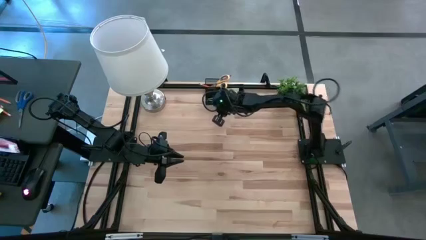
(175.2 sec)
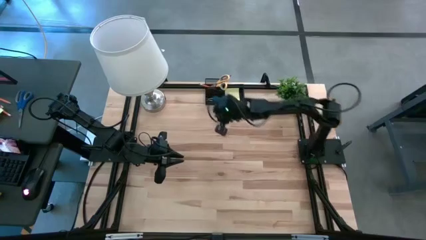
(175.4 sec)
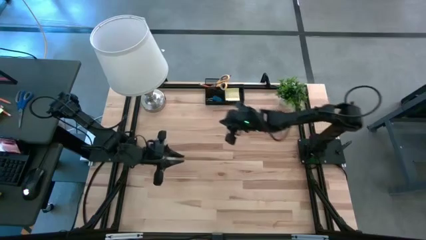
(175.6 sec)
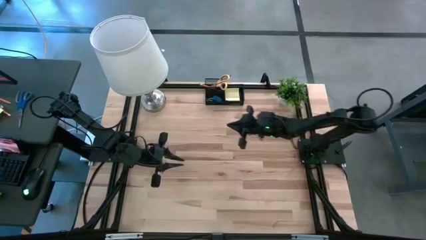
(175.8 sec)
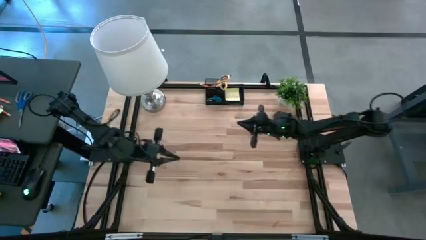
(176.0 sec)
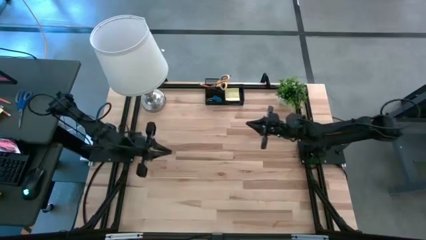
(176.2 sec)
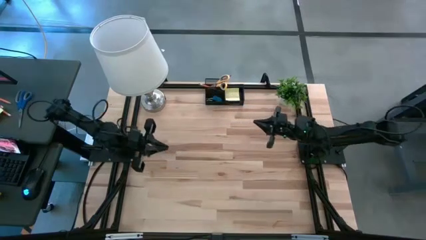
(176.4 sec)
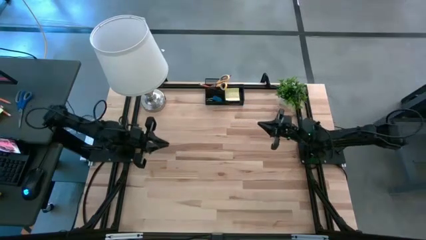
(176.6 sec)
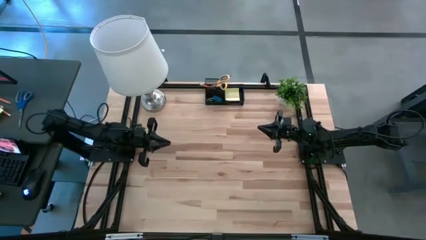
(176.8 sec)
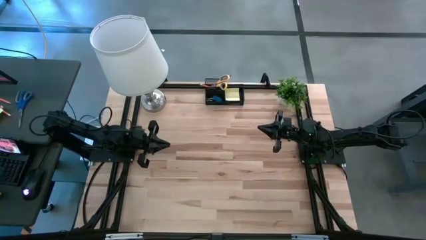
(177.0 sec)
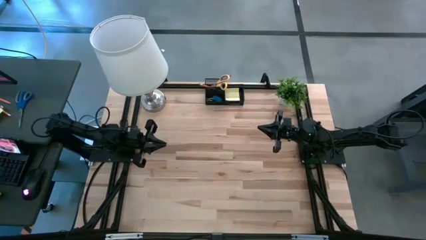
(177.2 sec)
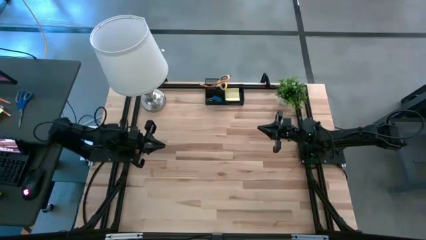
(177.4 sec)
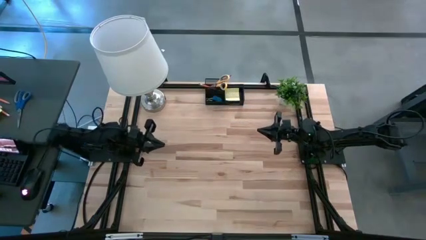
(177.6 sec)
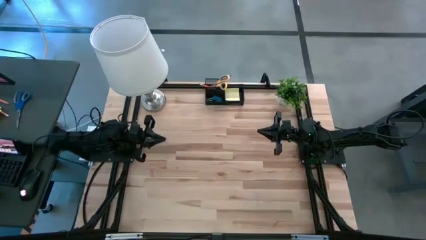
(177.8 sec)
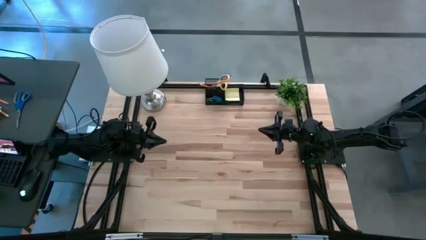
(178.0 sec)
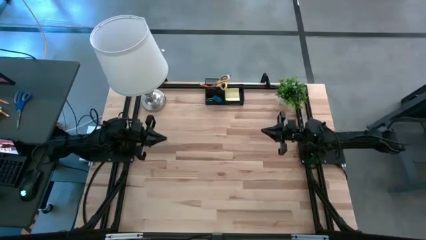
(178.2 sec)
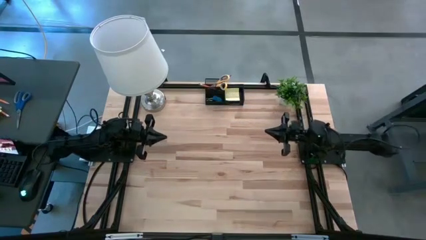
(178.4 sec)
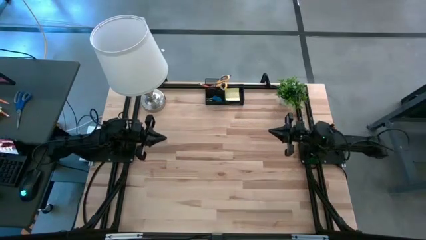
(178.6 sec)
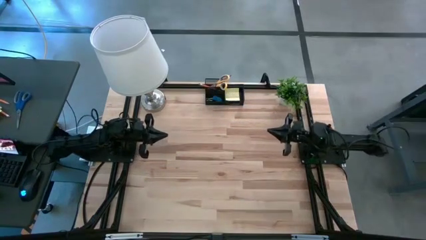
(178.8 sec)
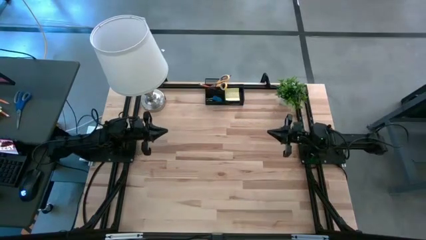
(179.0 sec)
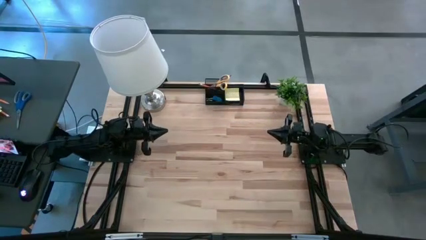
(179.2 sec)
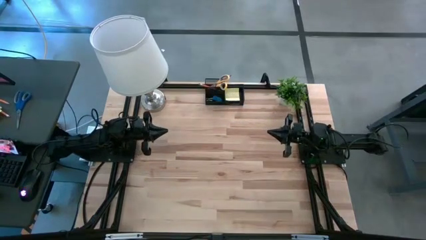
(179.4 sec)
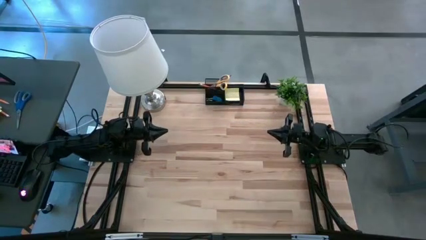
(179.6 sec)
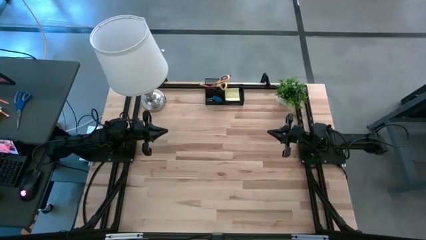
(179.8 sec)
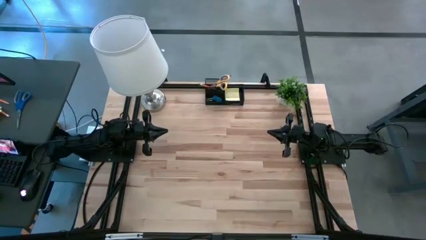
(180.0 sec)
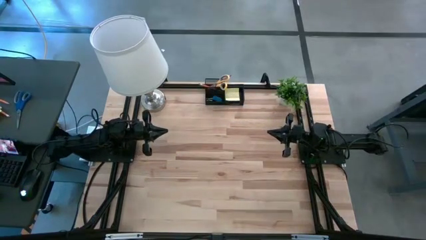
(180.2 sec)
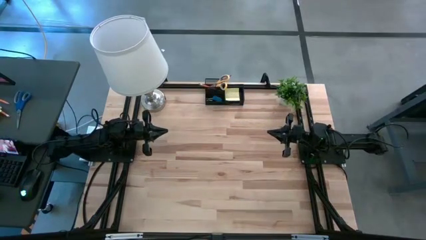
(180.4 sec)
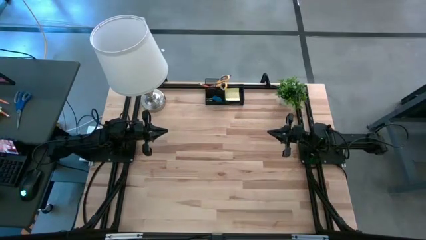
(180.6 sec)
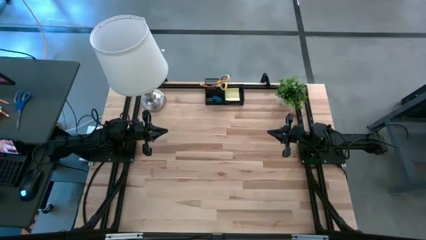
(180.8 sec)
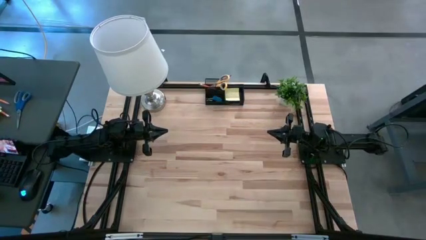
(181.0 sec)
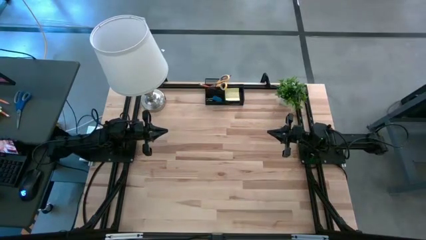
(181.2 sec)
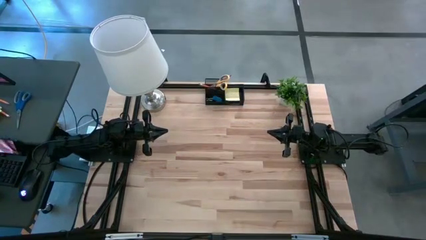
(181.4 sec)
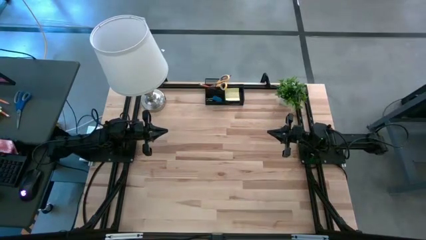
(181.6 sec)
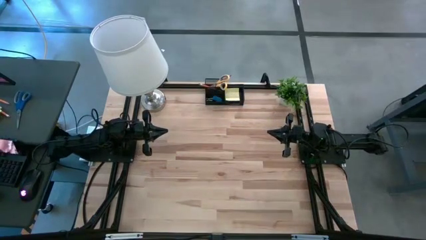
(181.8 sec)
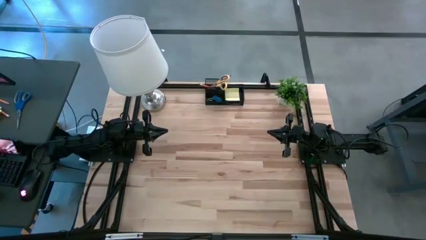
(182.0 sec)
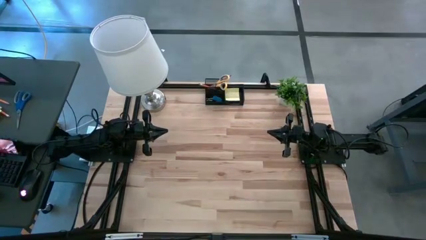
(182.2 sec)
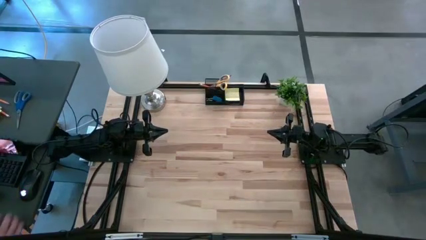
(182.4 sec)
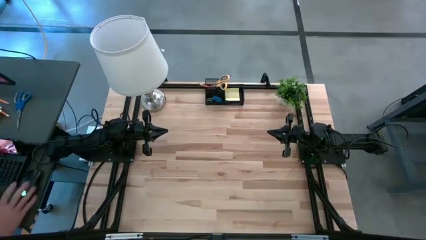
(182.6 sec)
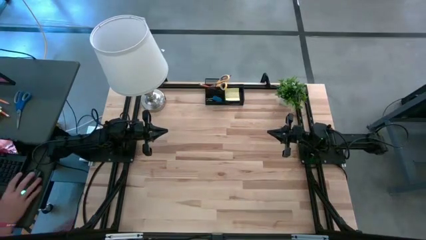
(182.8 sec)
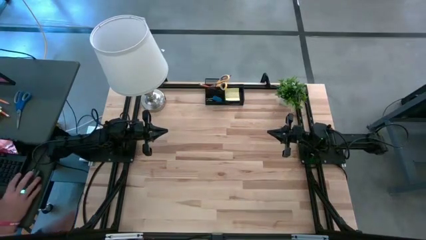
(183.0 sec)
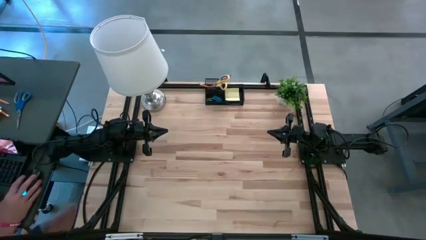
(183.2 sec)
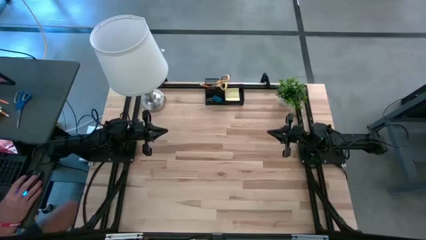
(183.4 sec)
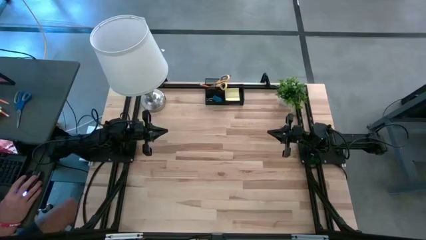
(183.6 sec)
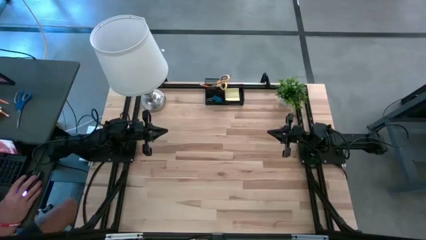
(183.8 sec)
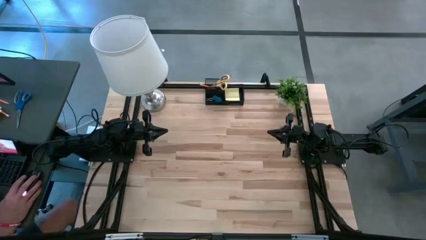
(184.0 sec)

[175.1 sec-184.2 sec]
Task: Pick and place office supplies into organizer
Return to Home Position

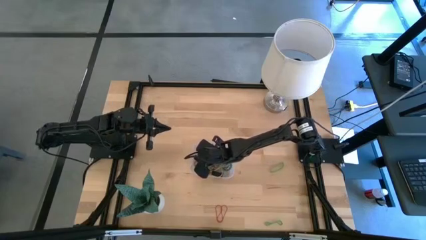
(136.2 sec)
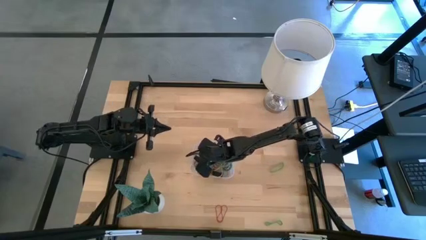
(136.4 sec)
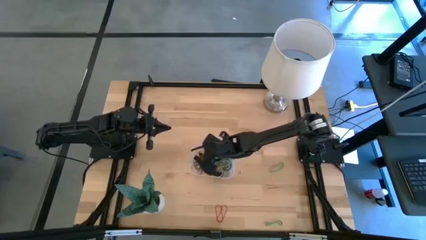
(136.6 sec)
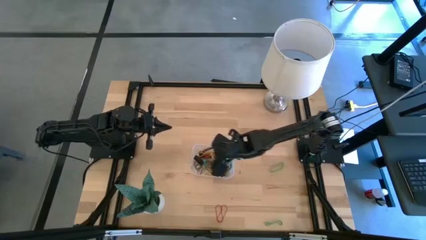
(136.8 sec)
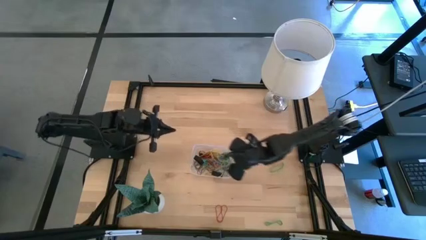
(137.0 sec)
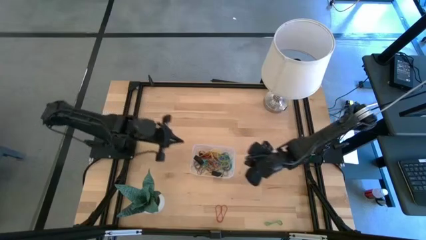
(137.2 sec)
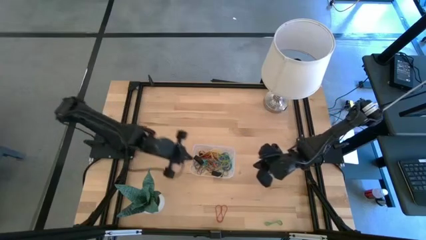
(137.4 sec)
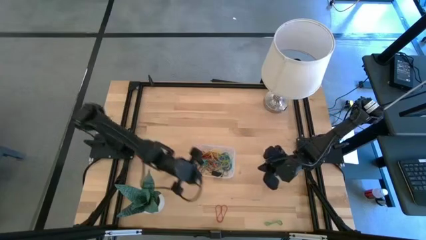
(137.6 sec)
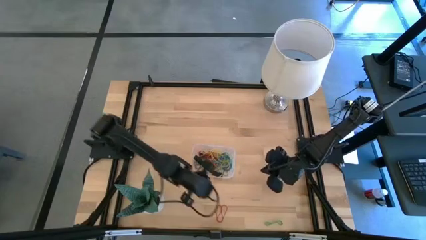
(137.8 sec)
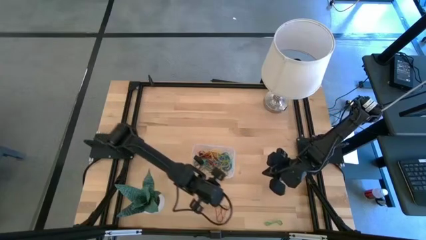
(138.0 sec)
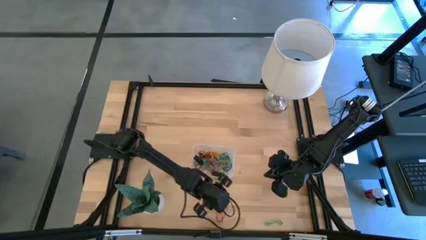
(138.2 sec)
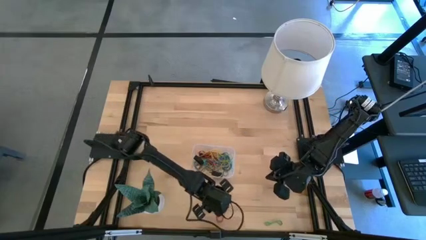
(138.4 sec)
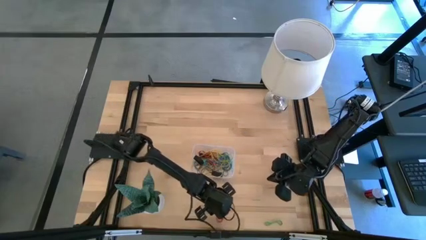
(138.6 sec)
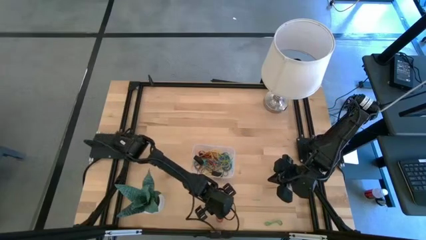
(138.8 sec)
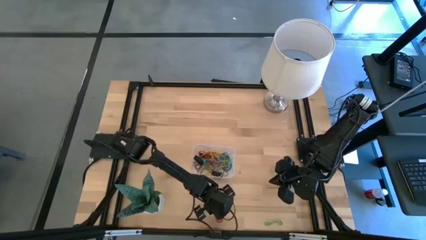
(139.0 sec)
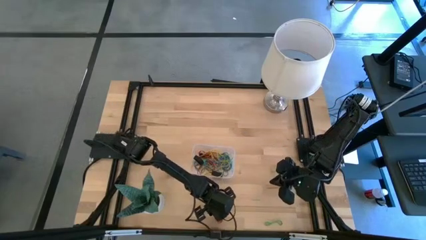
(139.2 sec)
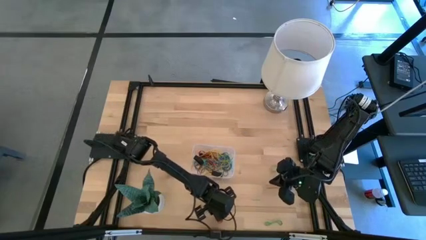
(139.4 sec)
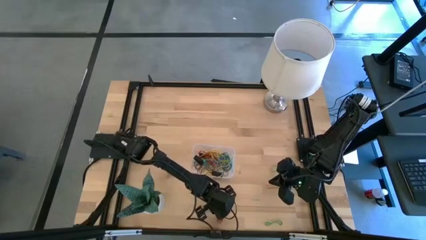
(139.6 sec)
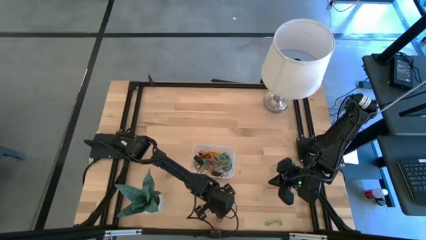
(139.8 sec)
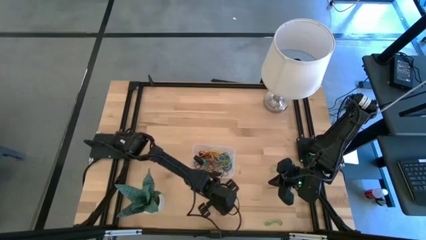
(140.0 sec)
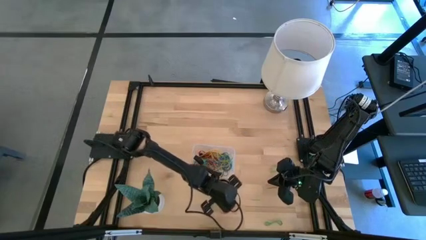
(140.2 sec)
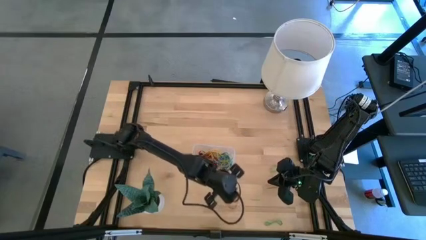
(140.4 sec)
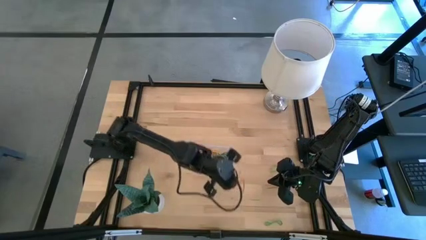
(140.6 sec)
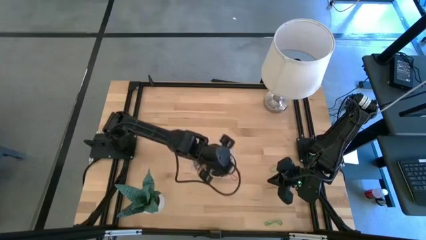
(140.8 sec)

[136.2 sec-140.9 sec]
Task: Pick and place rubber bands into bin
Put the red rubber band into the transparent bin

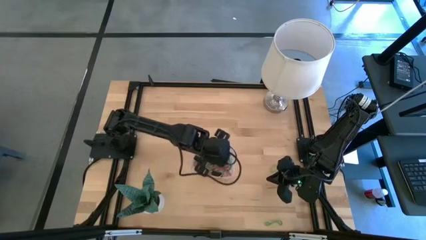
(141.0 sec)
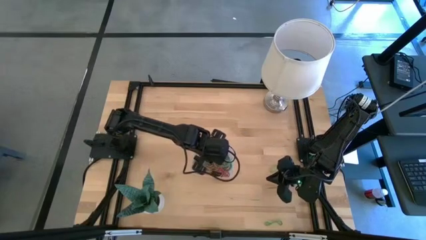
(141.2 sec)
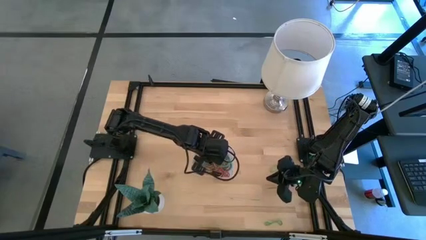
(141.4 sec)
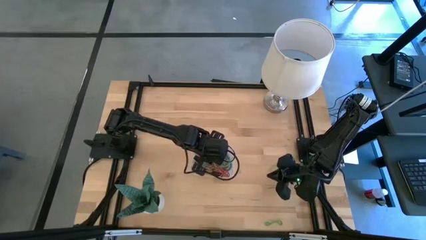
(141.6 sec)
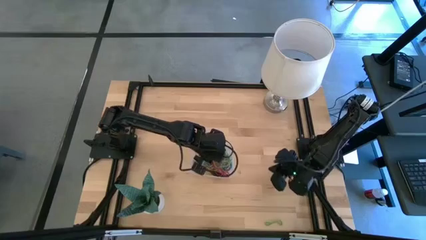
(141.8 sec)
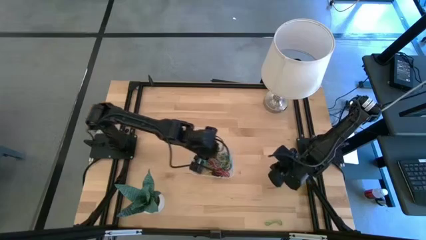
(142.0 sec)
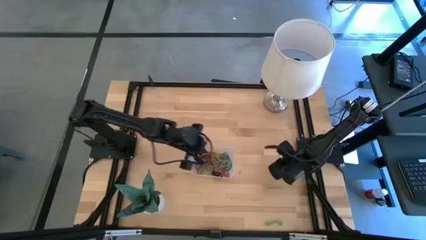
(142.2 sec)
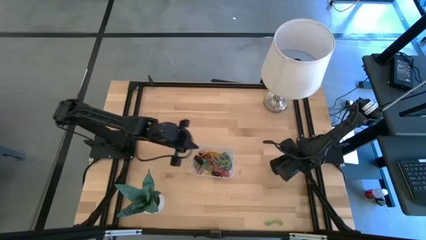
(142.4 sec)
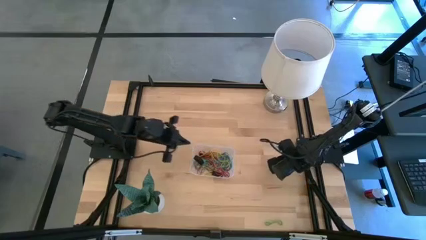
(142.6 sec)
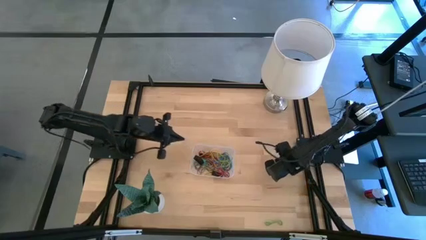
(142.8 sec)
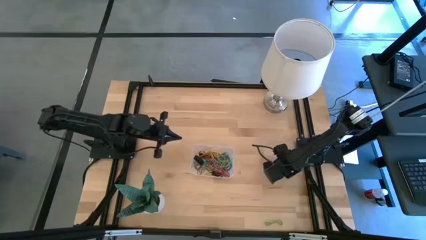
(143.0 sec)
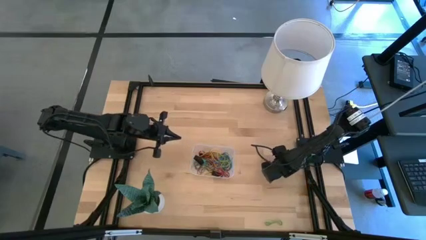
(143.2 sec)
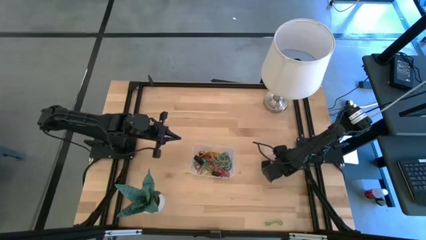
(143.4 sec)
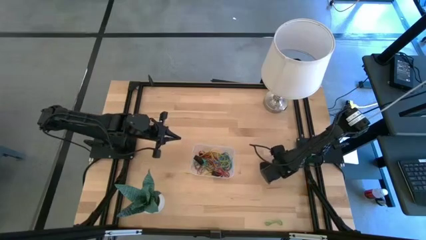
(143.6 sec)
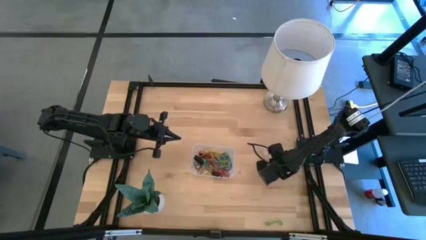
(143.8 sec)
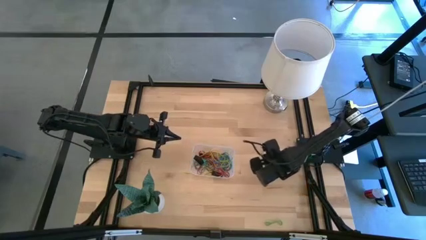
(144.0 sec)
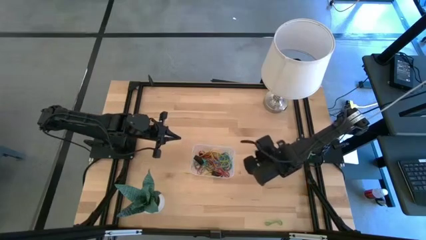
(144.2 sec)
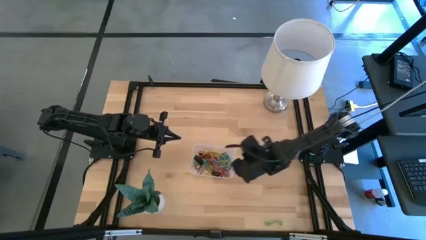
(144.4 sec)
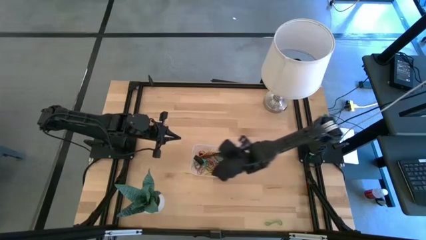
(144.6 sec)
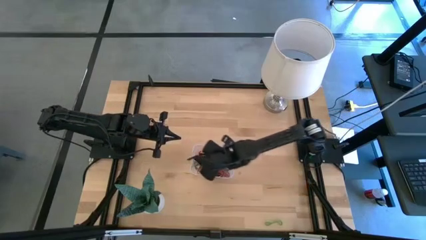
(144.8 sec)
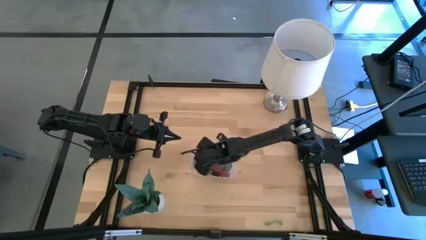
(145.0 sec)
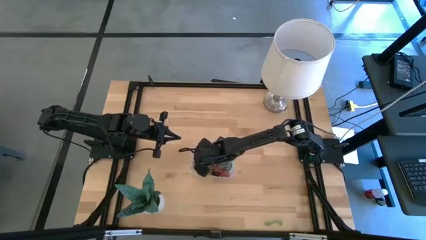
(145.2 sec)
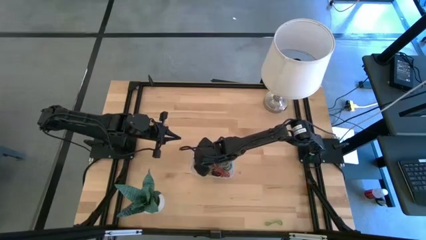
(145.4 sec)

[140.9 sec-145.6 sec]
Put the green rubber band into the transparent bin
